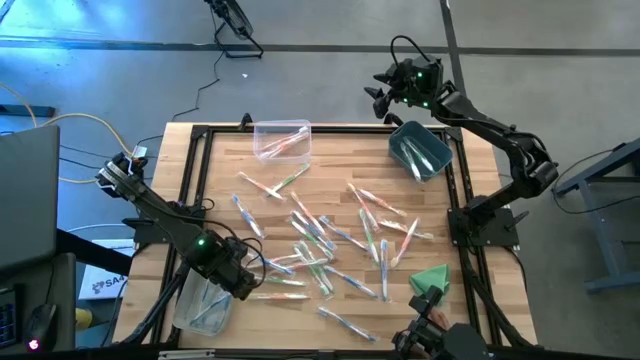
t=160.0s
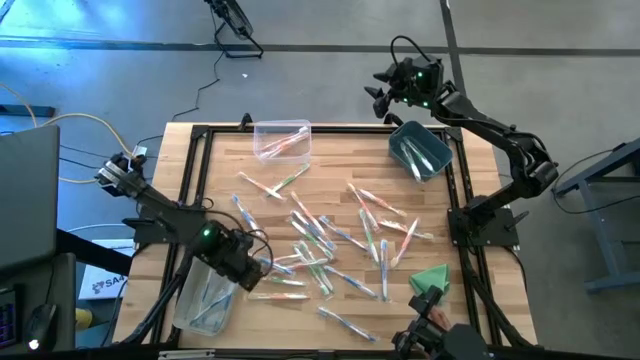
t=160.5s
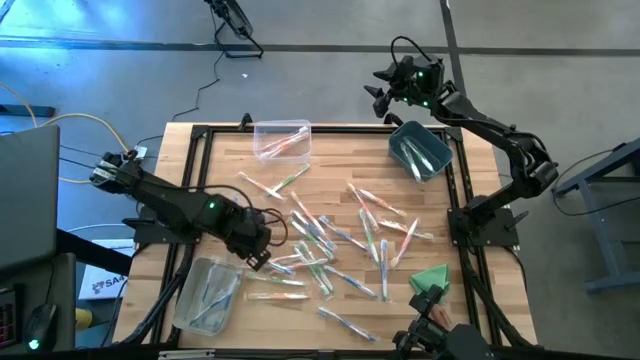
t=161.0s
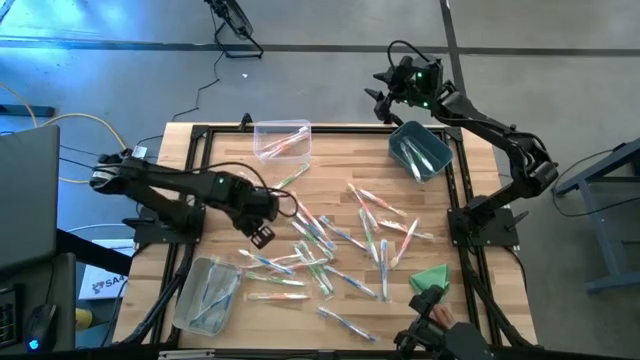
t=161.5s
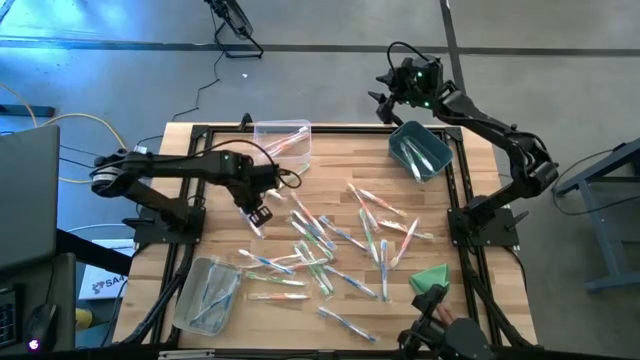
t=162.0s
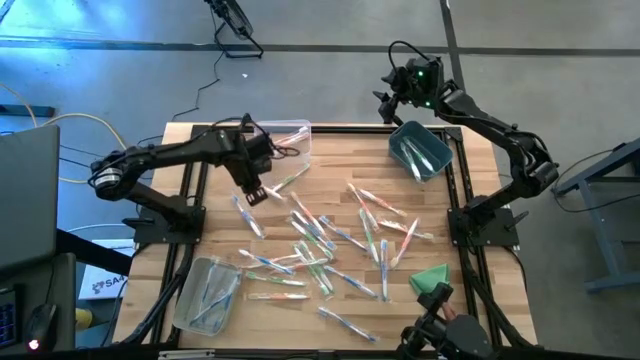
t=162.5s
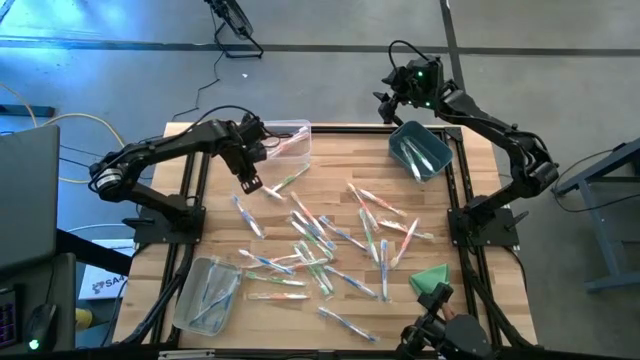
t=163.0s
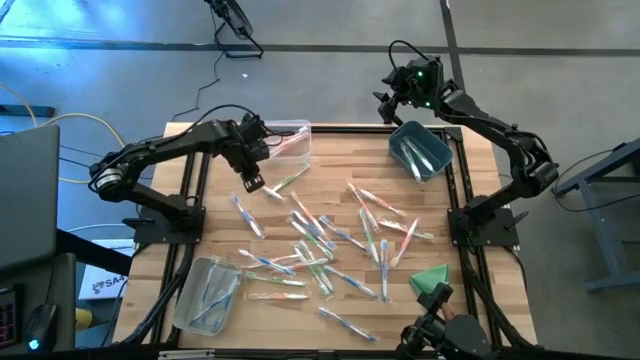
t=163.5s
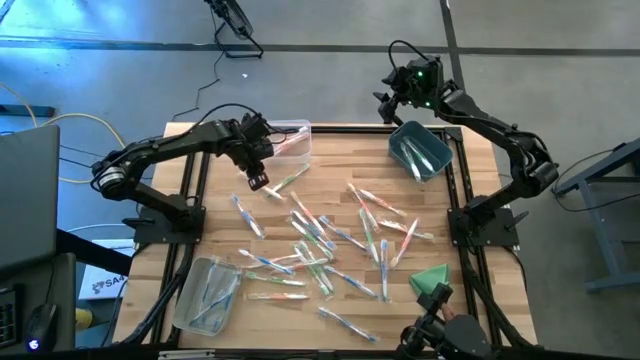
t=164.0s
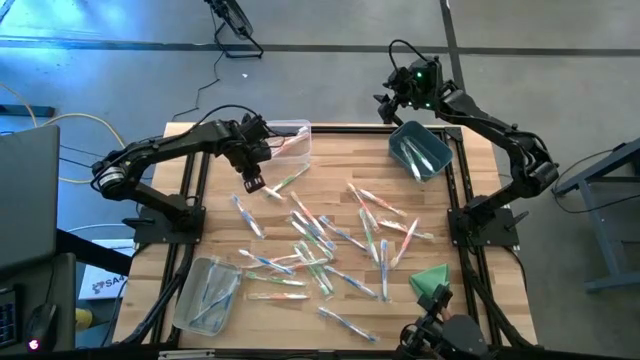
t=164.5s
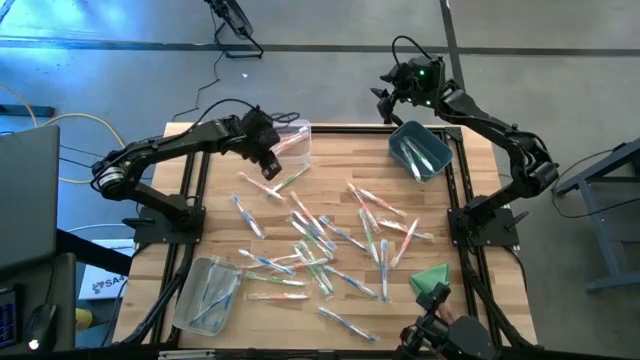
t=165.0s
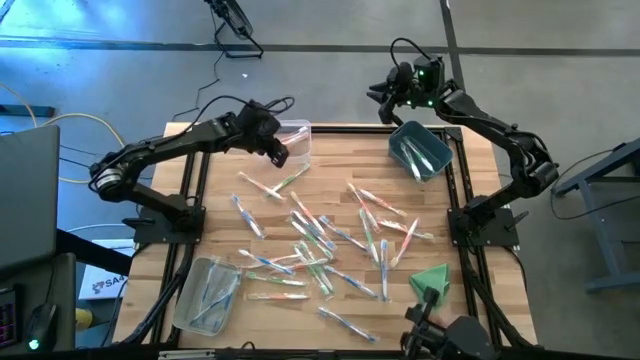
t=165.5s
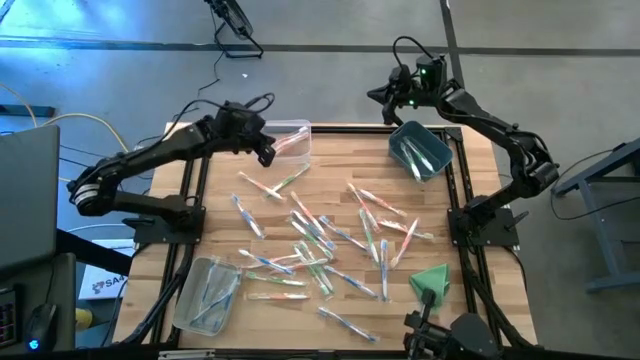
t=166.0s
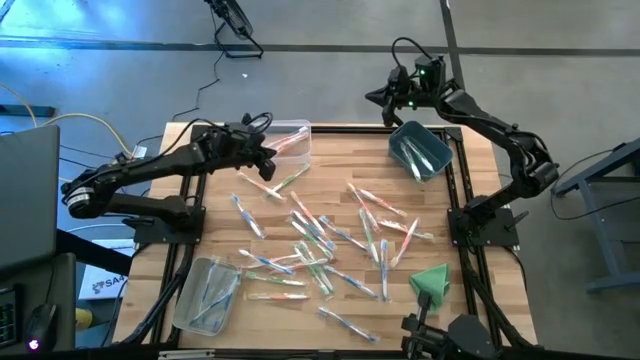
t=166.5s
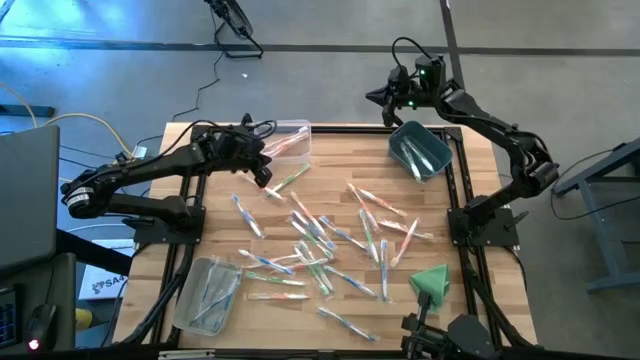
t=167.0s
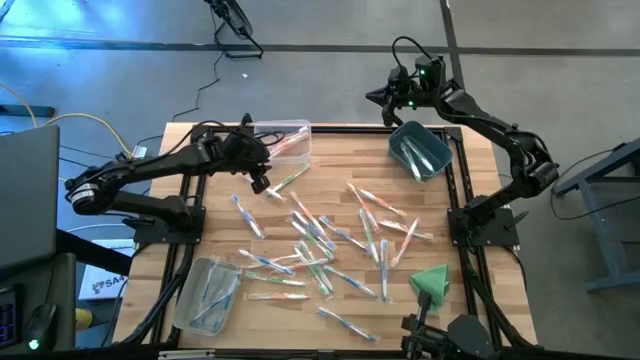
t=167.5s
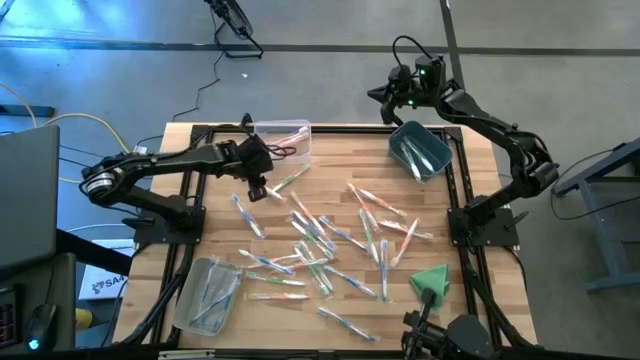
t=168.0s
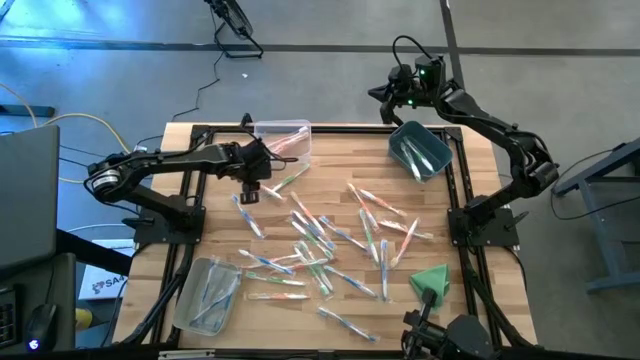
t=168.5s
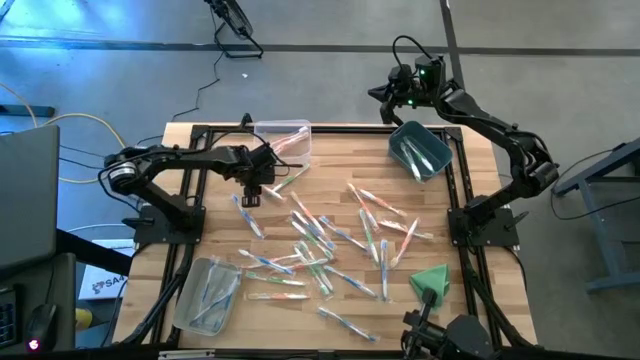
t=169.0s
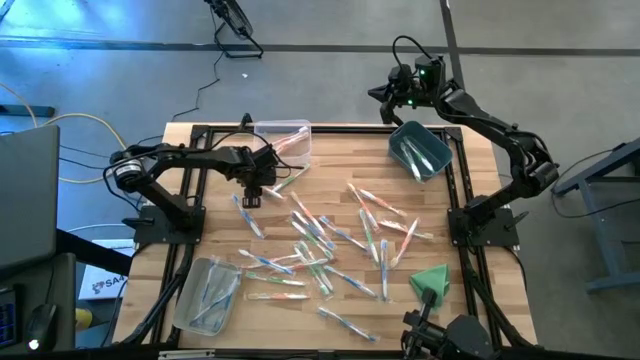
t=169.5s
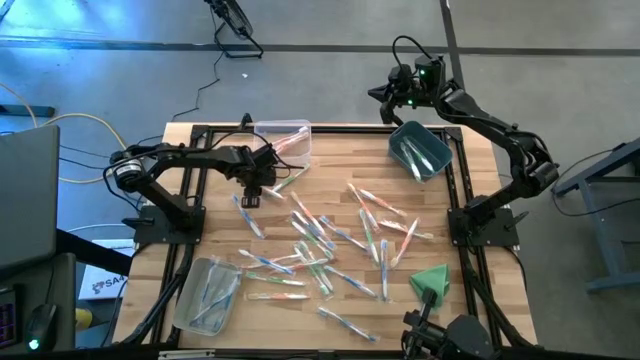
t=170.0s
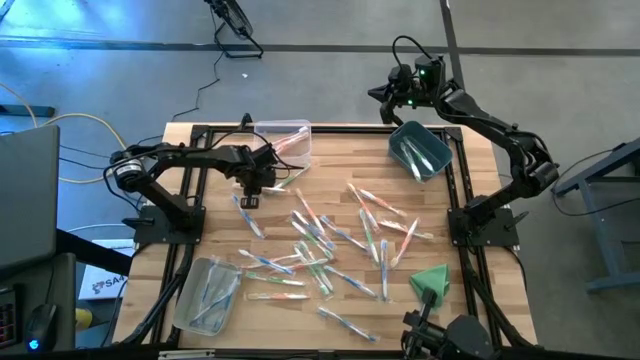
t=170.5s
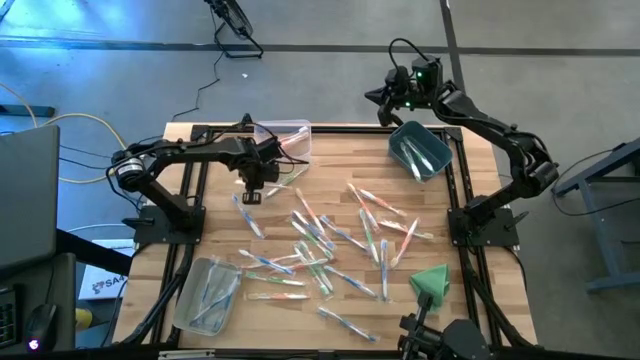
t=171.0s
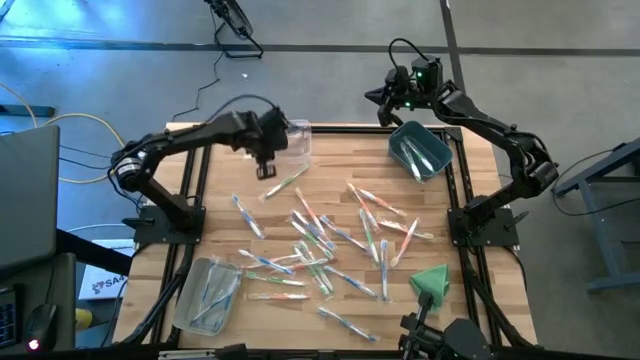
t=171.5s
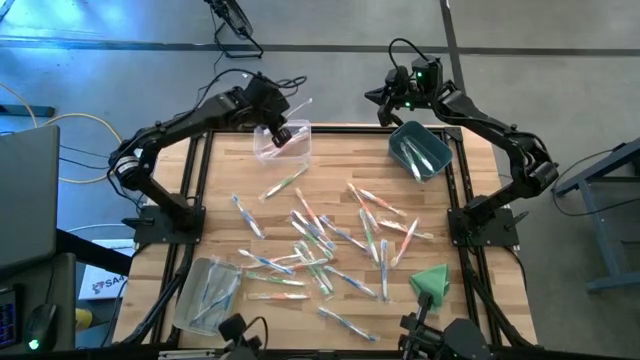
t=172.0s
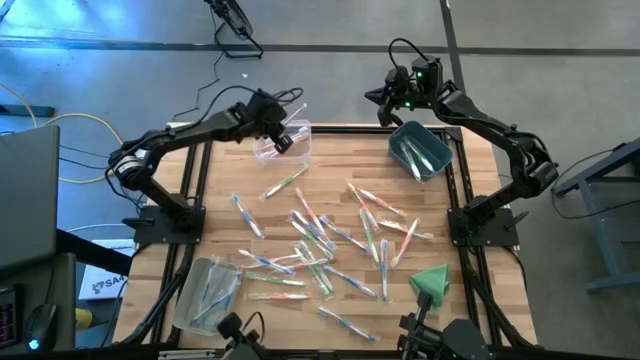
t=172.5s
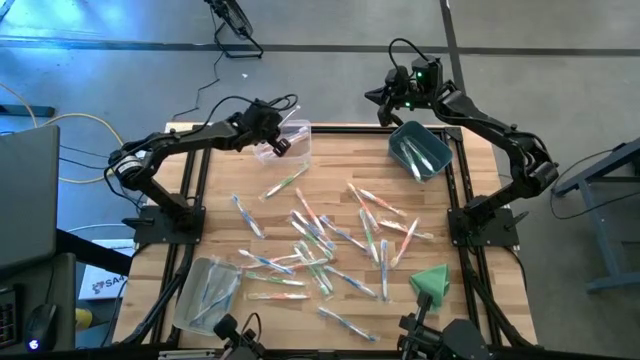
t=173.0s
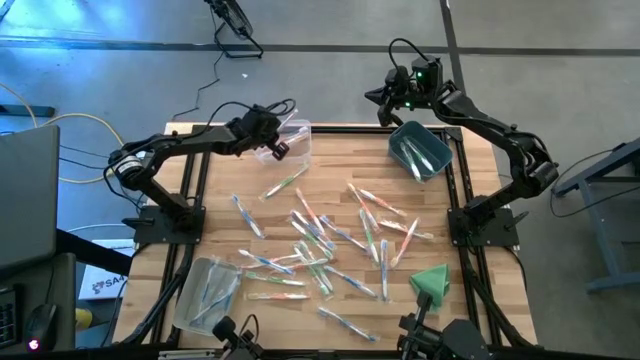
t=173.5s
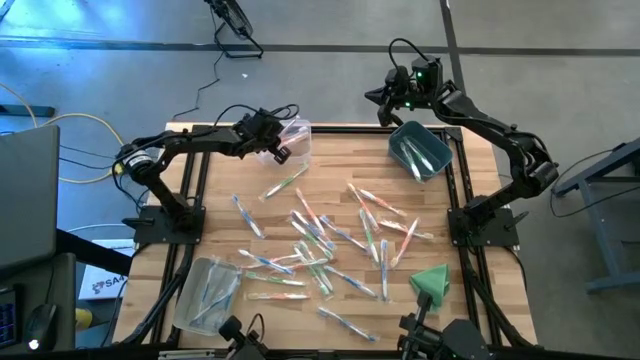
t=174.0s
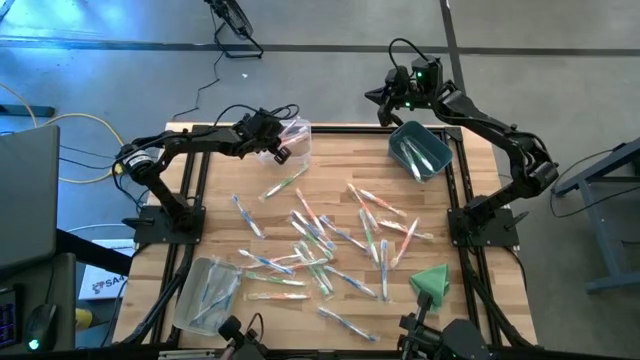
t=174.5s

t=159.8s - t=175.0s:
Task: Pick & Place Toothbrushes
Put the orange toothbrush into the transparent bin
